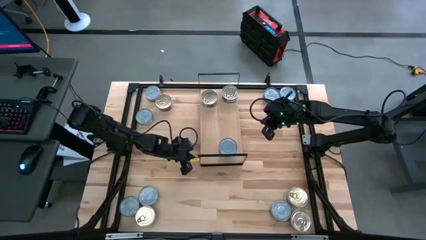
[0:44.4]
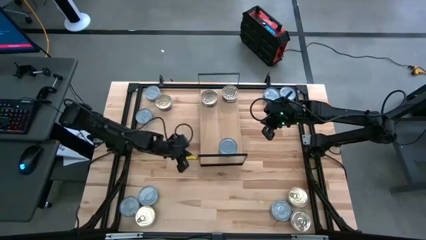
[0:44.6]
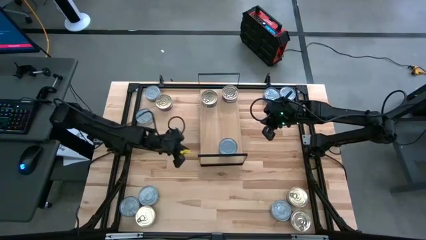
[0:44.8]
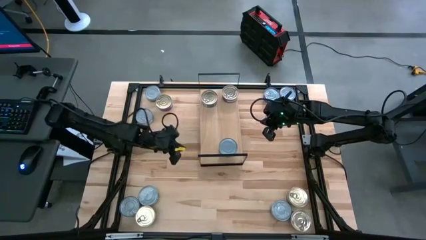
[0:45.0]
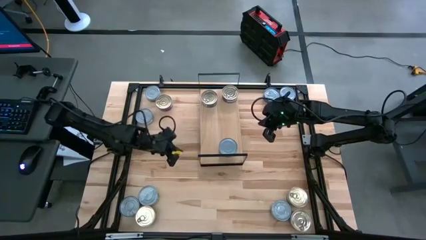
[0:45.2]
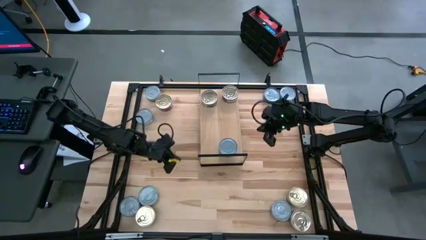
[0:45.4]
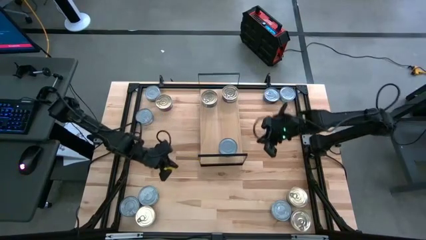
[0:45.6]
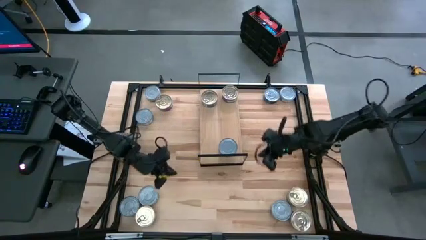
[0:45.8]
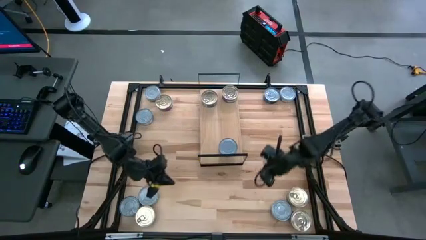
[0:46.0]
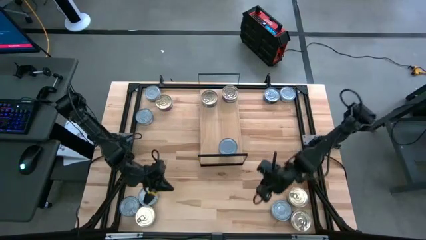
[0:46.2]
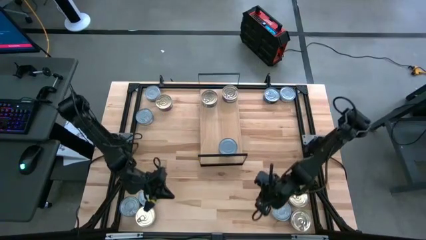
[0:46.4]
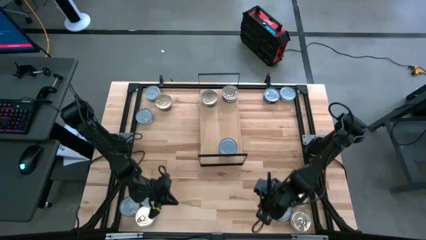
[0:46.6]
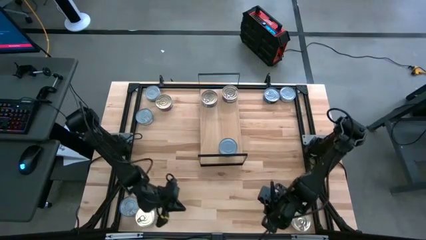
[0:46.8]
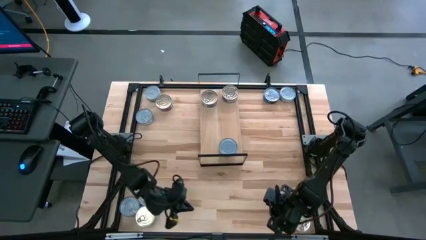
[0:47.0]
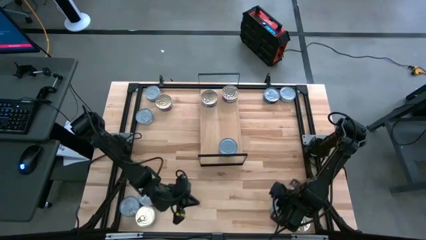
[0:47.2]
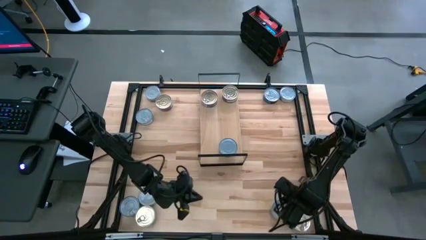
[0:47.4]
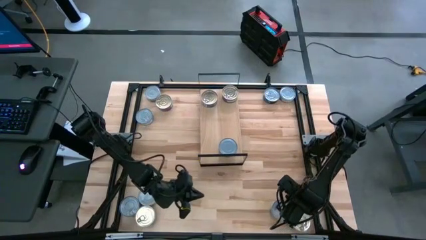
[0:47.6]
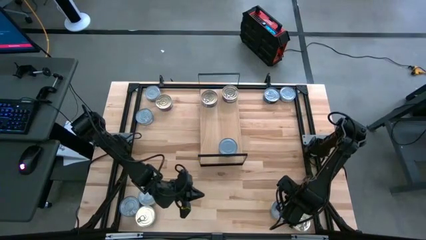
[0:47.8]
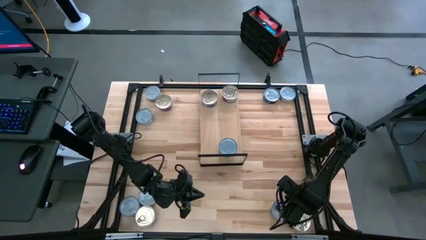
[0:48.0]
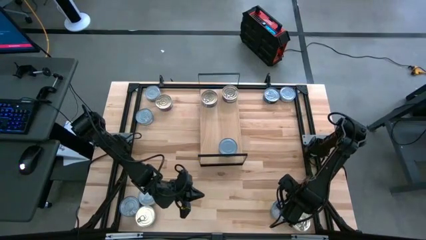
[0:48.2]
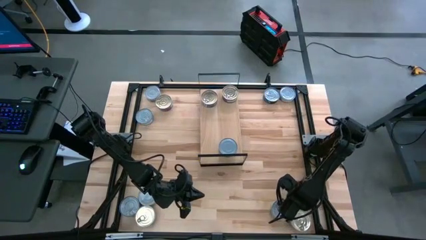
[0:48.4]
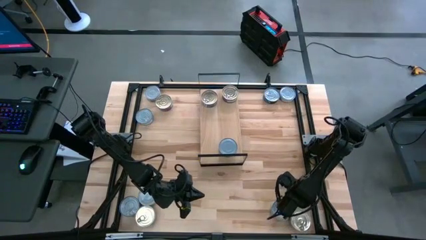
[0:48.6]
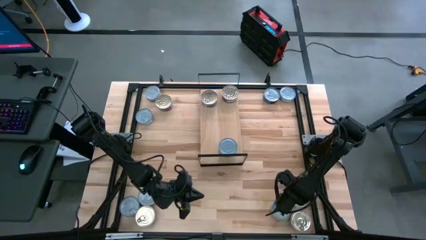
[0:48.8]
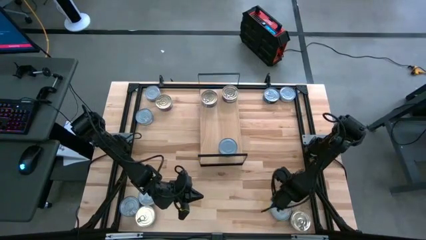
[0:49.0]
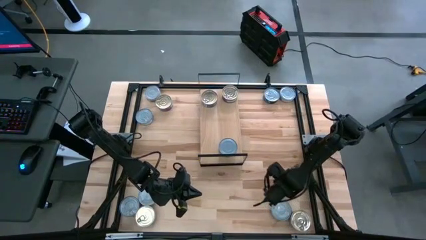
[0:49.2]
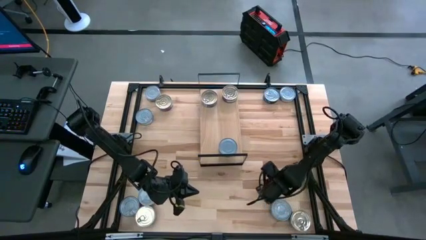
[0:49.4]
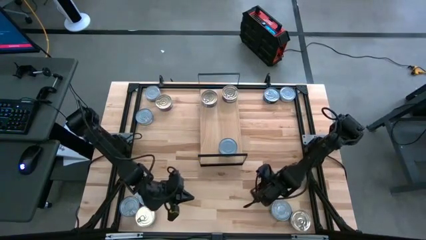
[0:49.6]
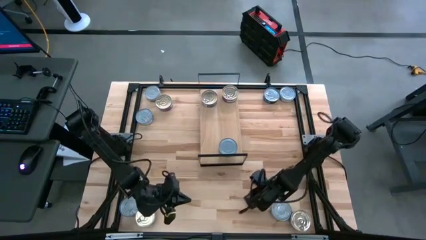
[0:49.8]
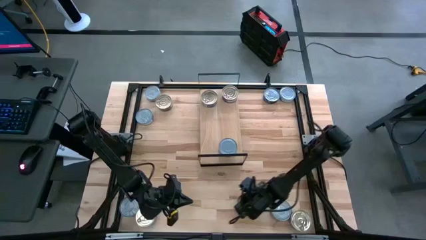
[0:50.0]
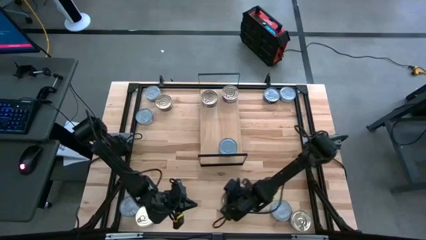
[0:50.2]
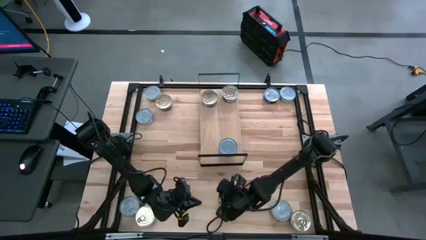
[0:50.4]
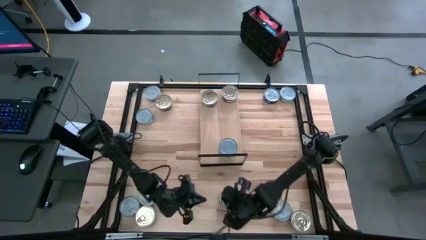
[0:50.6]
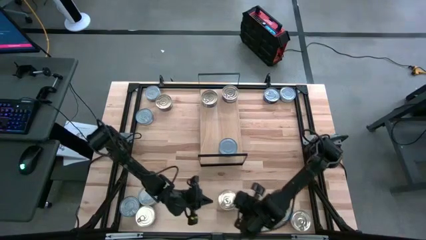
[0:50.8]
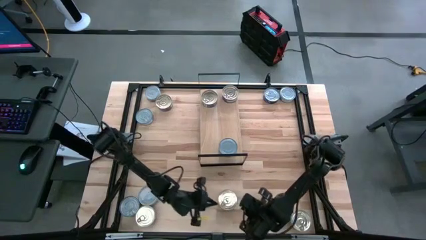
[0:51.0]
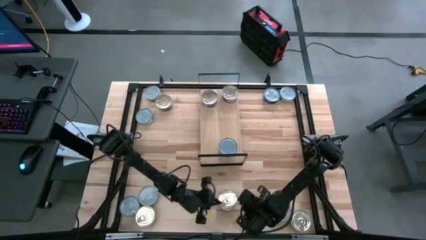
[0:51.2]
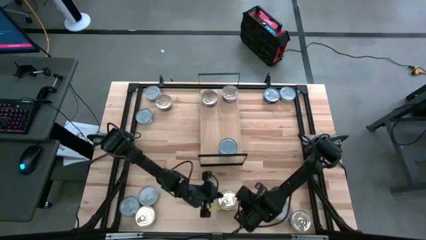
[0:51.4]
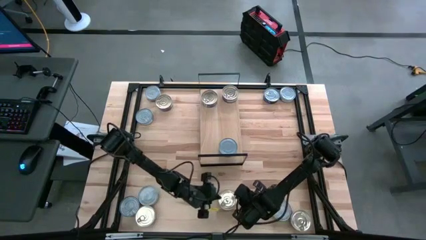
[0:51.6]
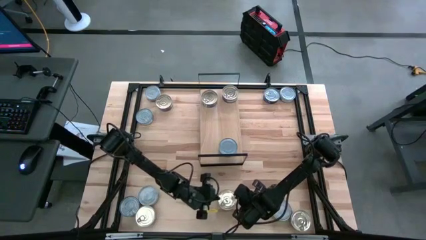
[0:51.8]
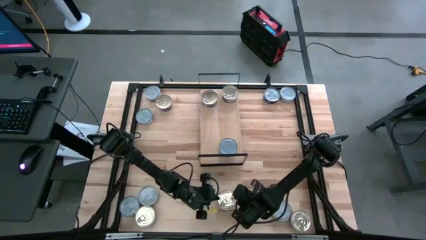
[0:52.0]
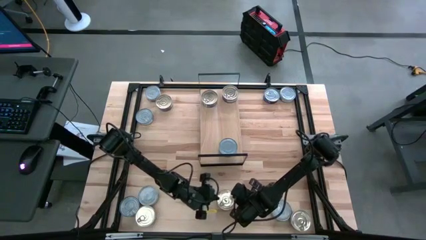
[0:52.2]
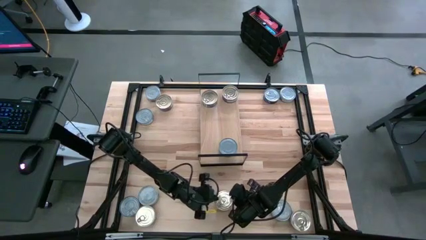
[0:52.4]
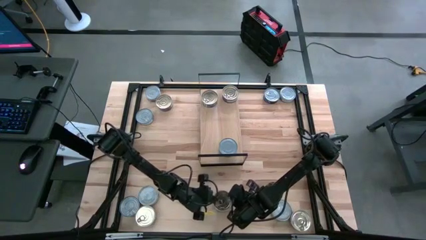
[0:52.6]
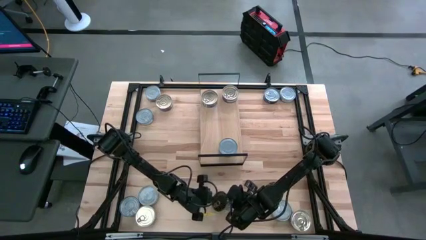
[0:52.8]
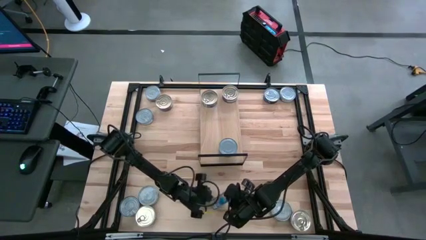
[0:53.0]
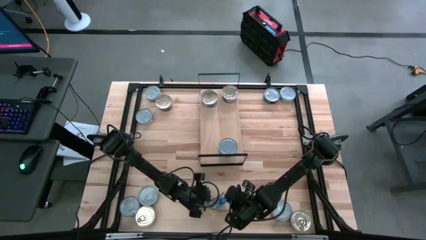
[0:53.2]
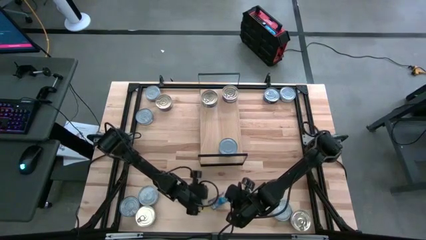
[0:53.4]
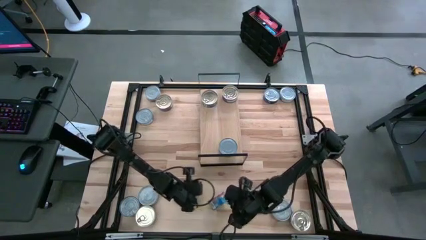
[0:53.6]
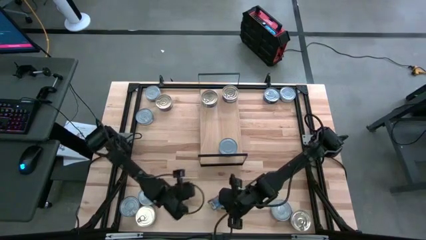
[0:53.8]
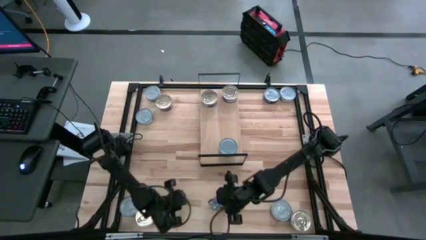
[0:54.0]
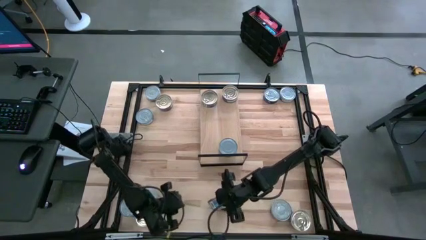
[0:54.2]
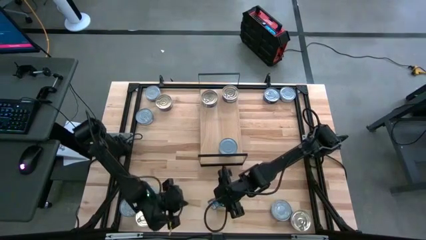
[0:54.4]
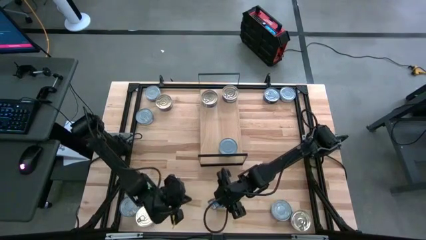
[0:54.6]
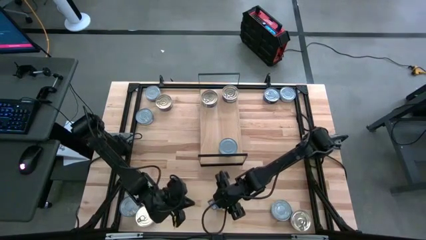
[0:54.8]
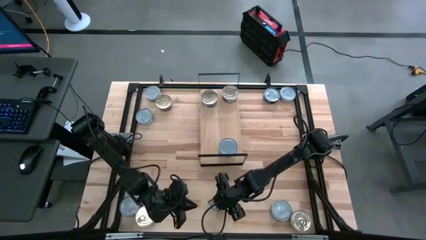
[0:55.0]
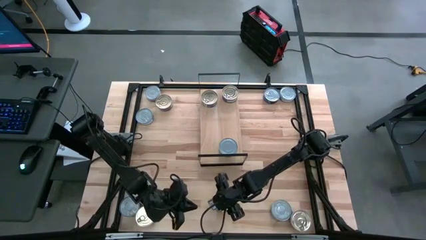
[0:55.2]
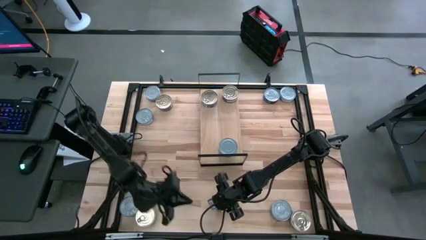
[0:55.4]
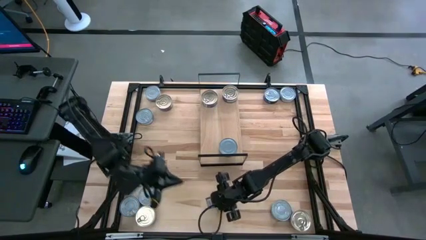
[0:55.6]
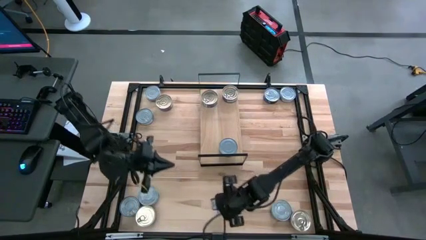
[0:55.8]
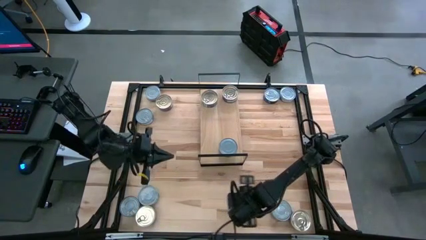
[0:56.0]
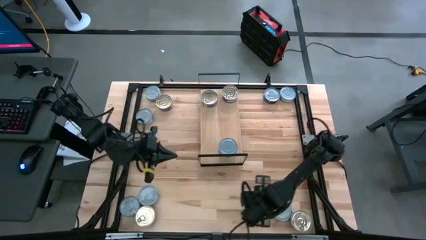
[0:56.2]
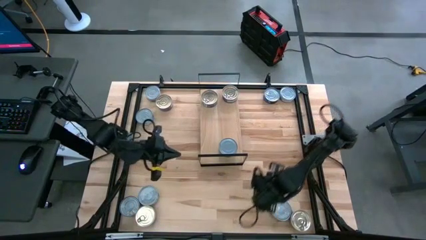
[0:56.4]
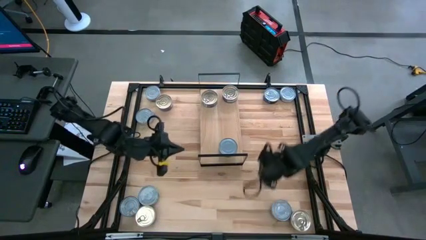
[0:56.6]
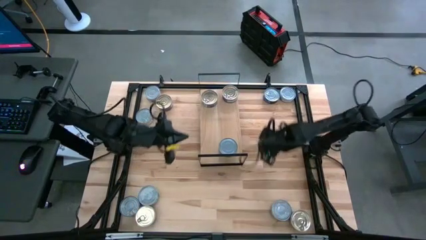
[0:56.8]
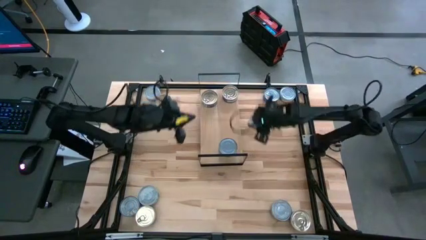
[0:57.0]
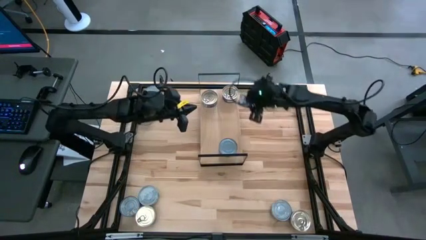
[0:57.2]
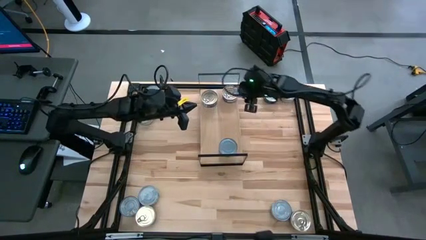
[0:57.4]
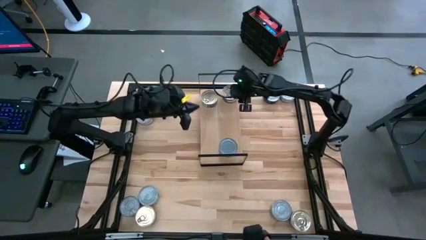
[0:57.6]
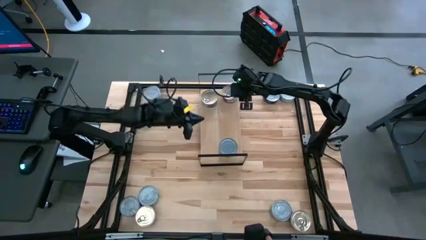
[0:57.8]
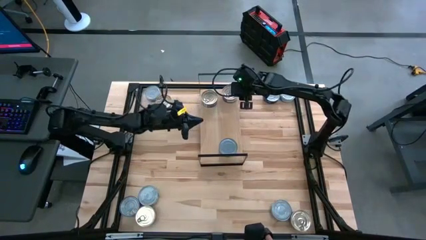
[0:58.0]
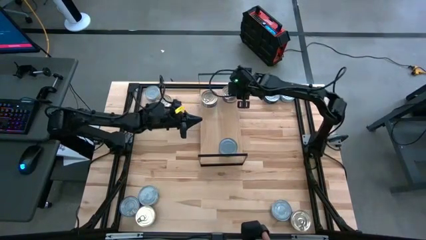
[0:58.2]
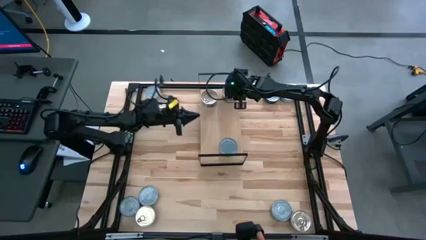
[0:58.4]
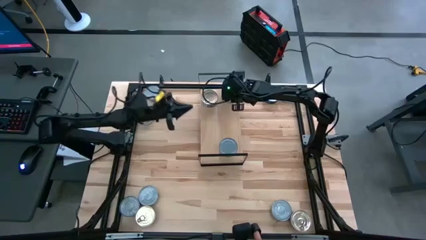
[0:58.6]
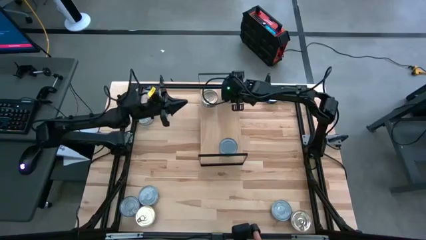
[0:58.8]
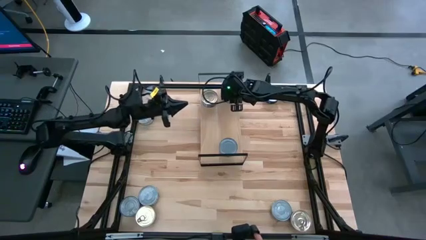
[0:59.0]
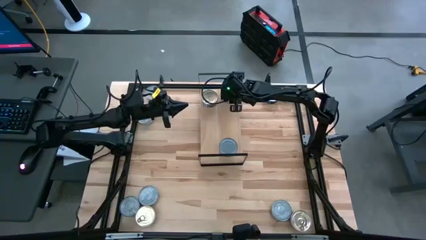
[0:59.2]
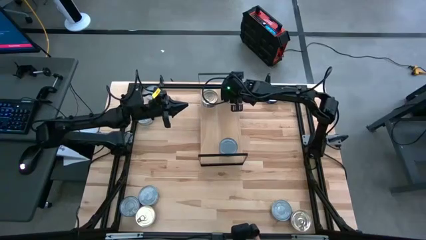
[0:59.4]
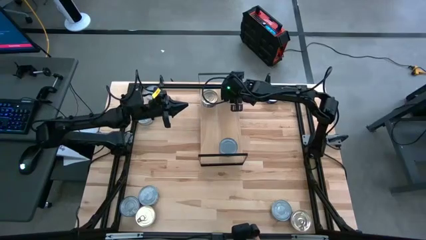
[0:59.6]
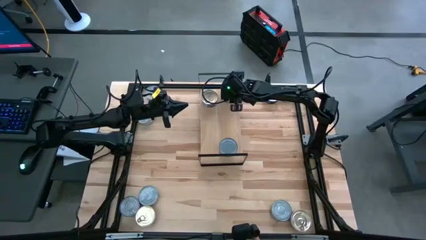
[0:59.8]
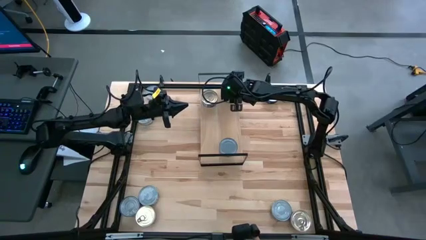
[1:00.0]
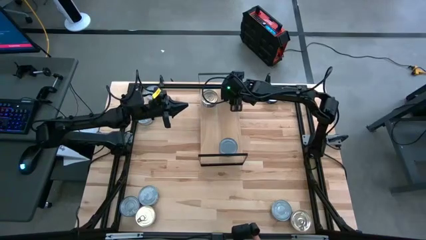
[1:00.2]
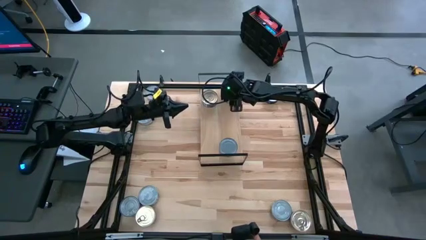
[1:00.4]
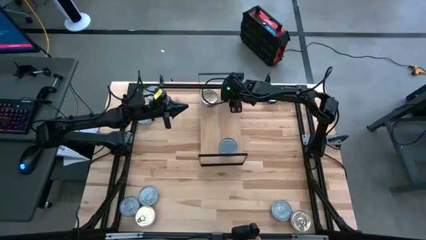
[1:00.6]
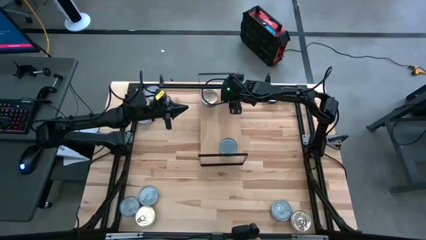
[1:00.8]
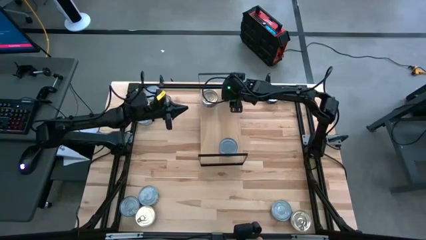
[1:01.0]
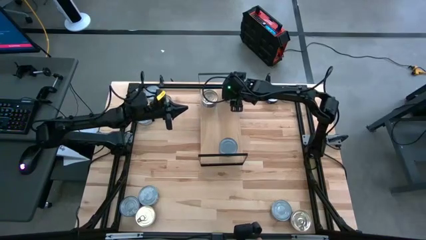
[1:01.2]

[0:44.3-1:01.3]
Task: Stack canned seafood by type on shelf
Stack the blue pink tuna can on top of the other blue pink tuna can on the shelf
